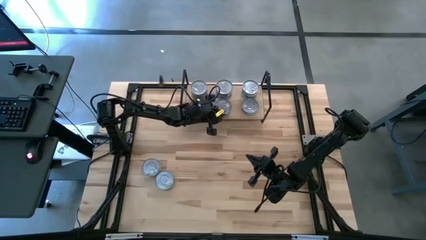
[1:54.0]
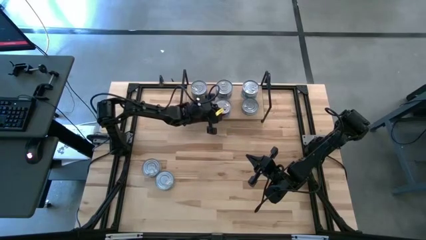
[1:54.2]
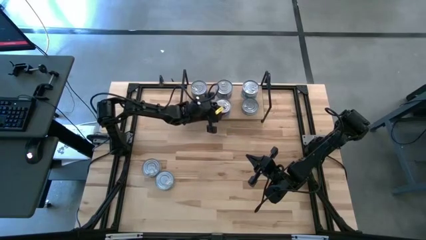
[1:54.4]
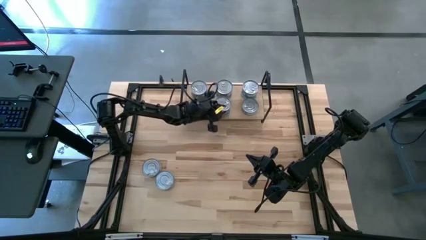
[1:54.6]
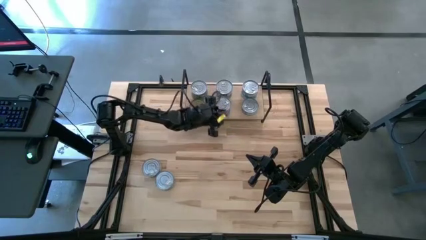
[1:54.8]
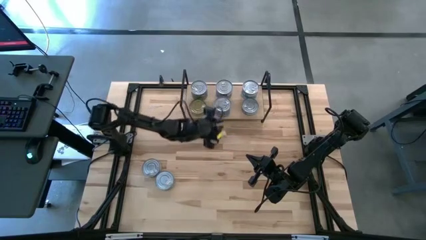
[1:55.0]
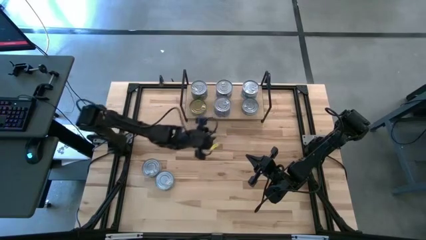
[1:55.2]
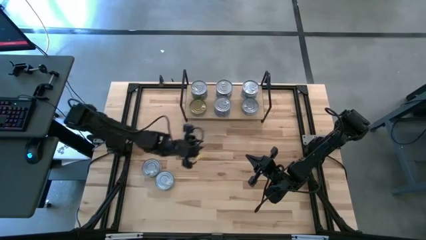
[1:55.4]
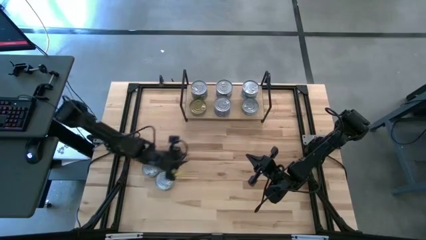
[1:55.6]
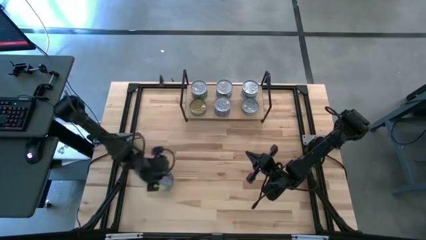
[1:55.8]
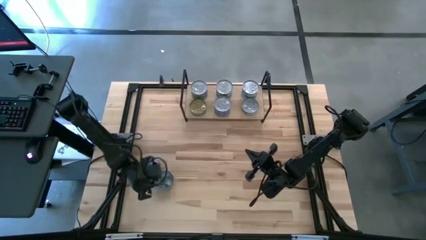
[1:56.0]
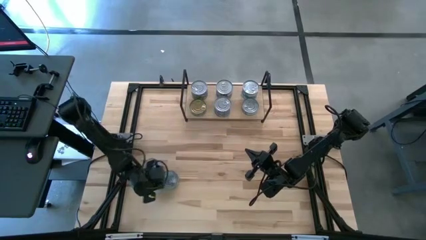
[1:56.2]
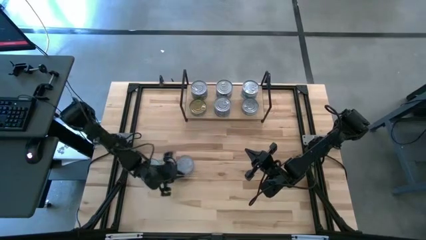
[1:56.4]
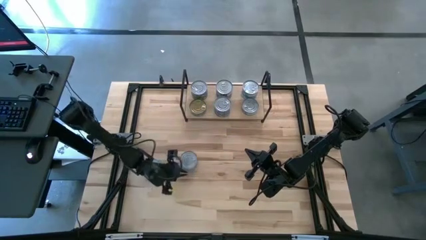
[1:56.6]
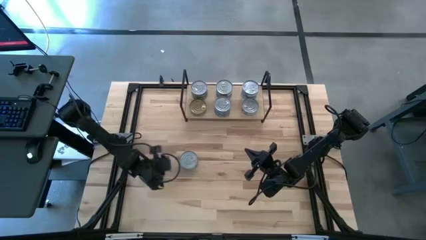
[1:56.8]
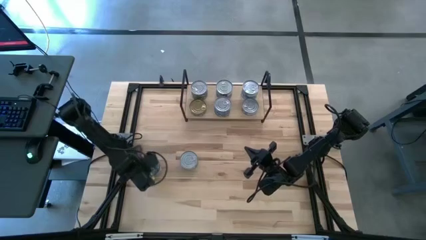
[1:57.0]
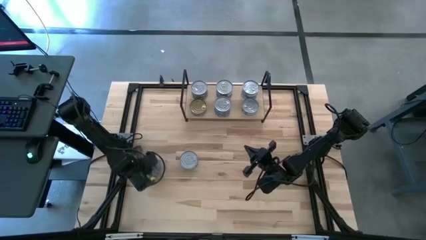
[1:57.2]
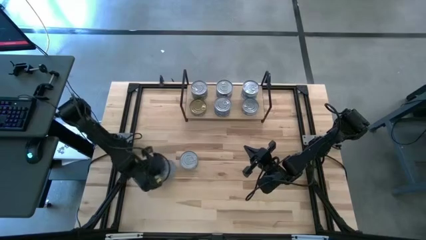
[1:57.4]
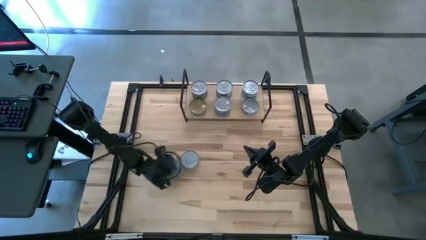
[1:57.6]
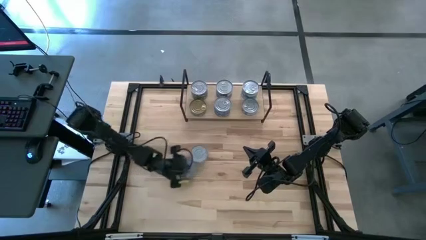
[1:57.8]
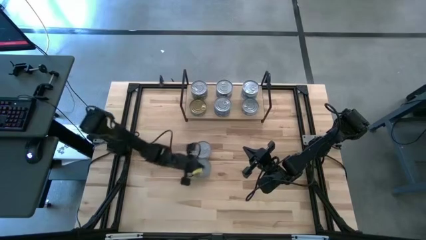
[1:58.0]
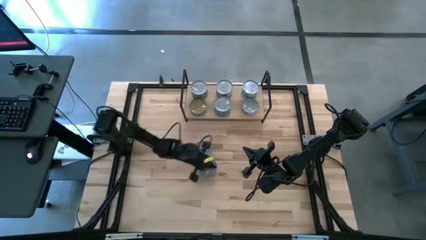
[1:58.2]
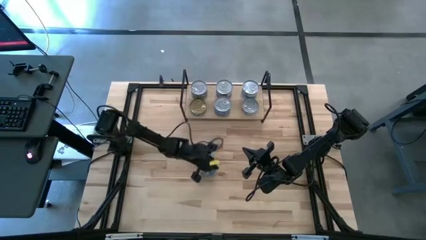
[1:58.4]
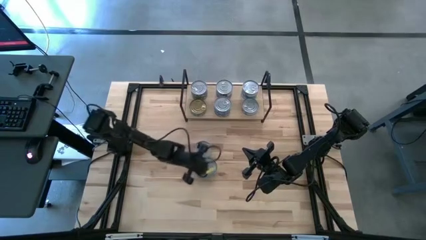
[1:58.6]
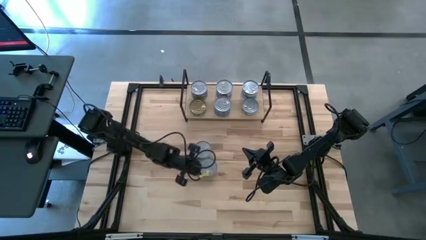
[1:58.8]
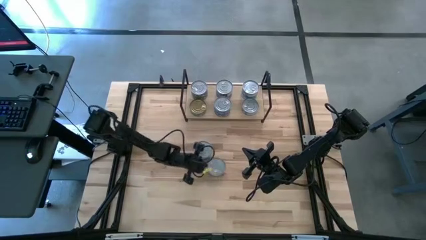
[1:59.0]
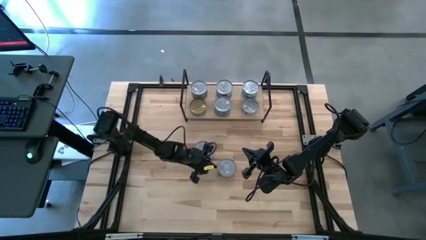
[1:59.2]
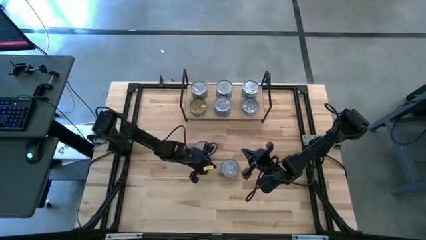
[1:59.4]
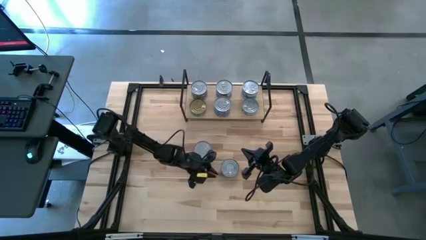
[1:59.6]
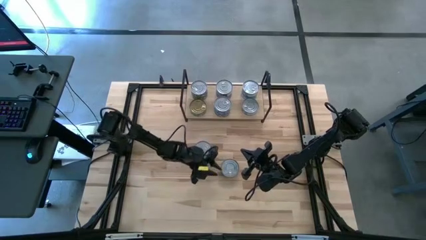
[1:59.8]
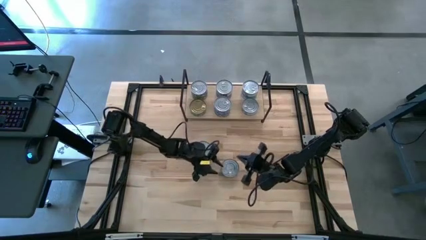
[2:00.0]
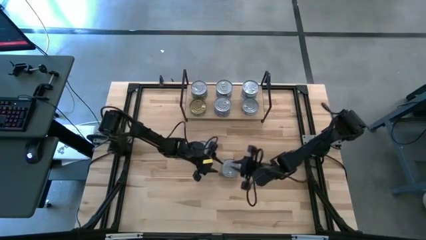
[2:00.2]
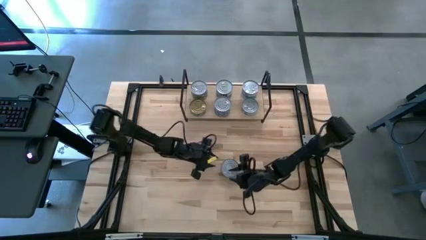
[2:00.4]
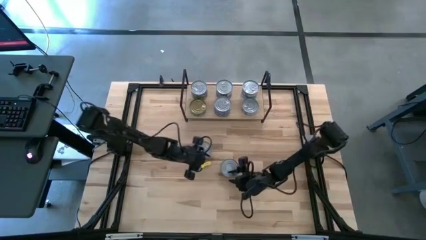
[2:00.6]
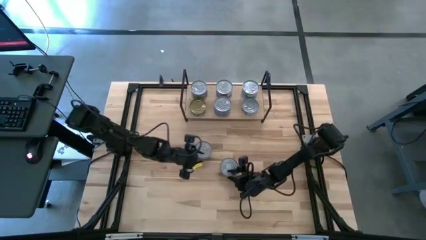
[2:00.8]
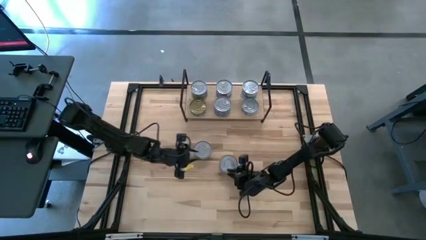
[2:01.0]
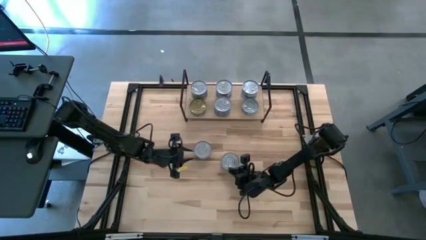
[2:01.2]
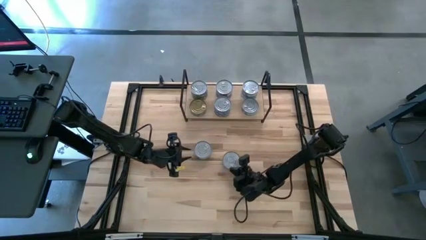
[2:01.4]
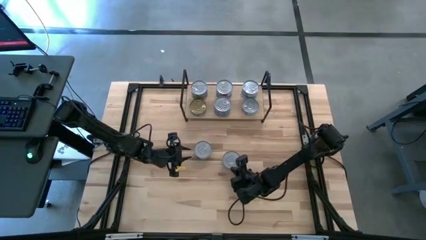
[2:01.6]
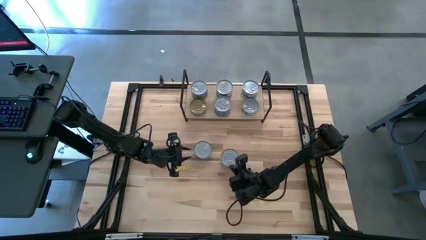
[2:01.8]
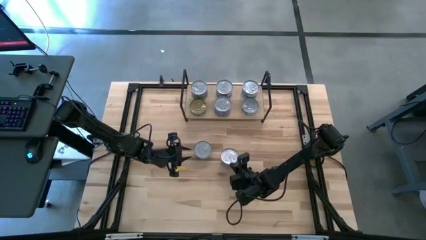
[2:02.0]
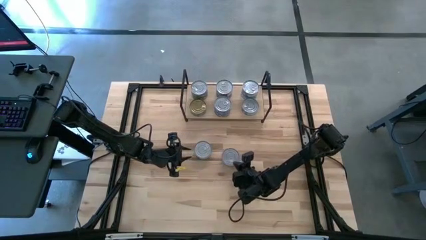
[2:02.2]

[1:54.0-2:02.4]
Task: Stack canned seafood by type on shelf
Stack the yellow-blue tuna can on top of the yellow-blue tuna can on the shelf

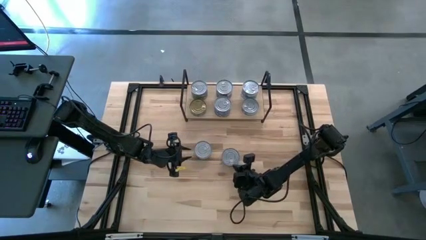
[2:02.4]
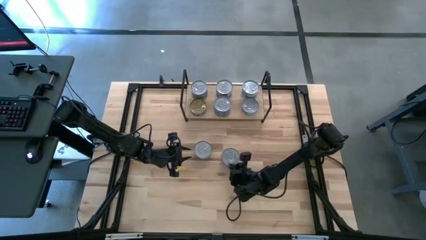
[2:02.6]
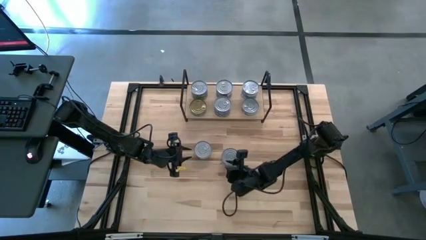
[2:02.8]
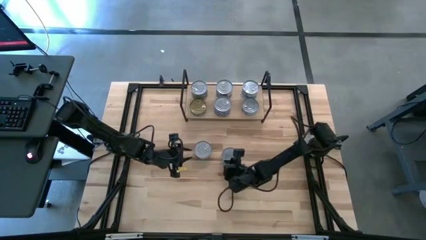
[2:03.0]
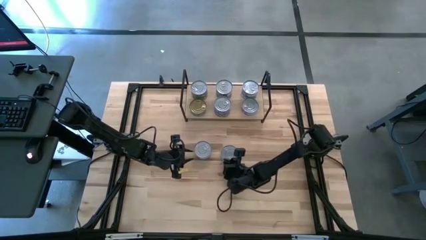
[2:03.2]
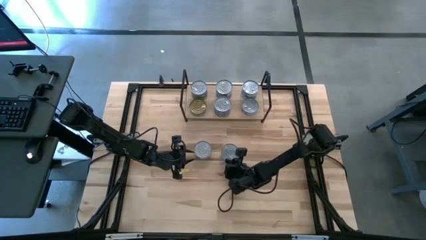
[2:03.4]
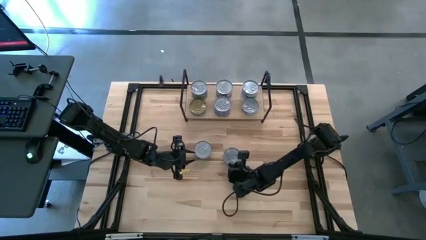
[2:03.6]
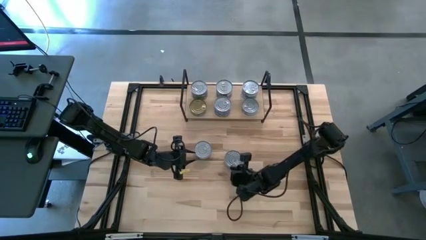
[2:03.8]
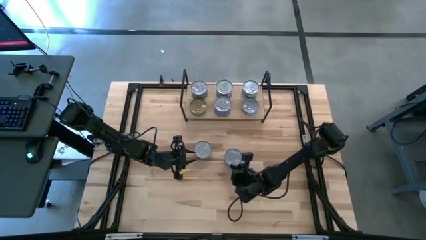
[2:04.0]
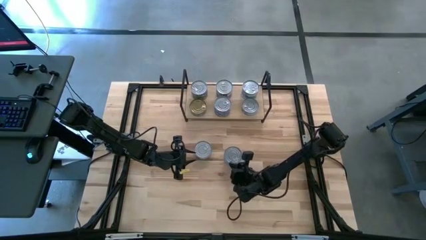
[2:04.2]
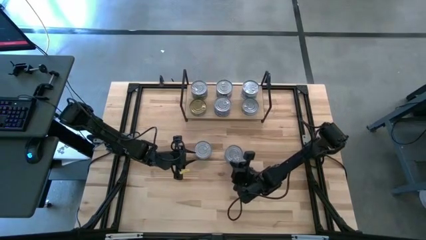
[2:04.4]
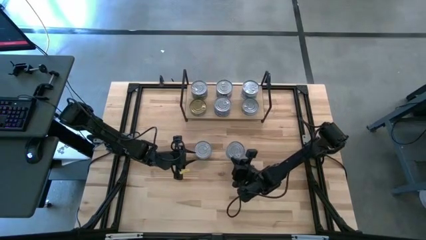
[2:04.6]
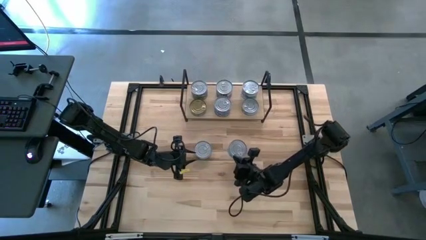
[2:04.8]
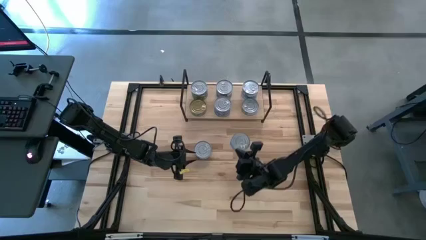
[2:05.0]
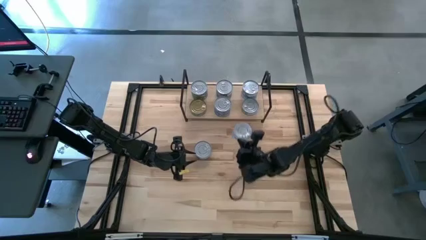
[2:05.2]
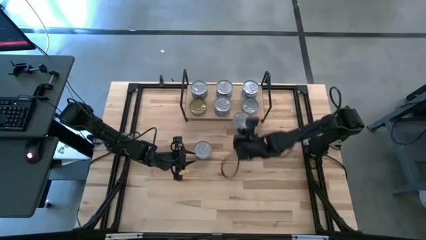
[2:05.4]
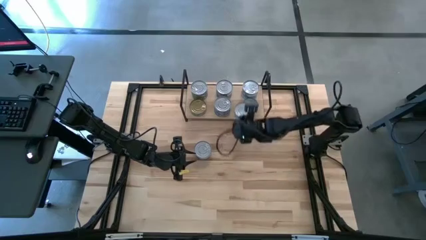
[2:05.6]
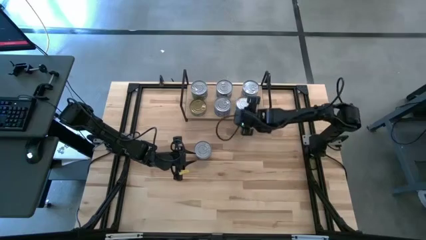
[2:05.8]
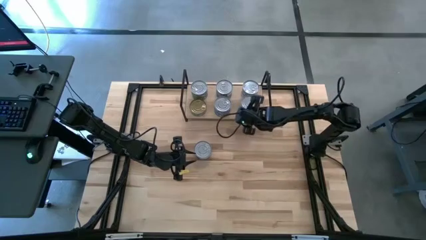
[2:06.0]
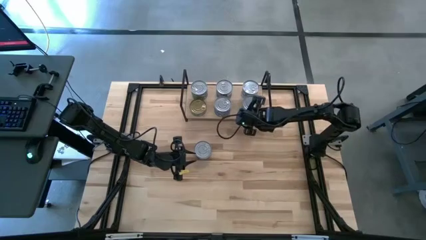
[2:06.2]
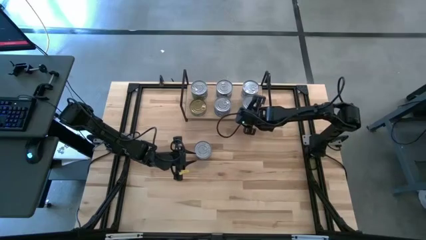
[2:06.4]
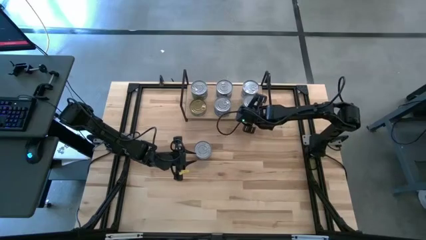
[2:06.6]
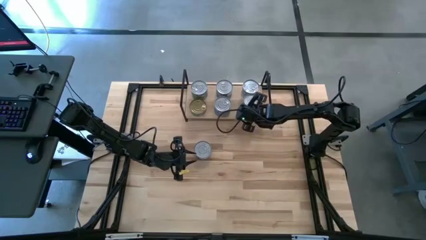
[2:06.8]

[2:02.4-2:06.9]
Stack the yellow-blue tuna can on top of the yellow-blue tuna can on the shelf

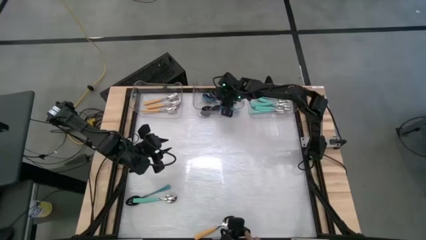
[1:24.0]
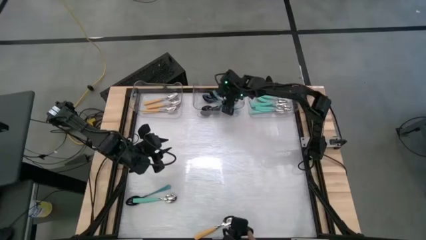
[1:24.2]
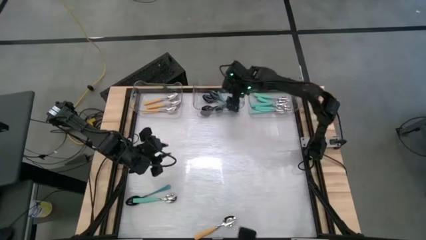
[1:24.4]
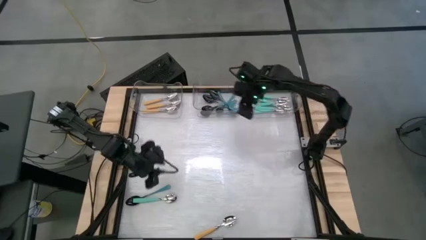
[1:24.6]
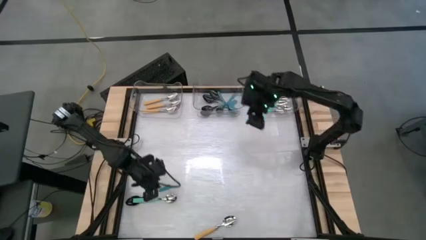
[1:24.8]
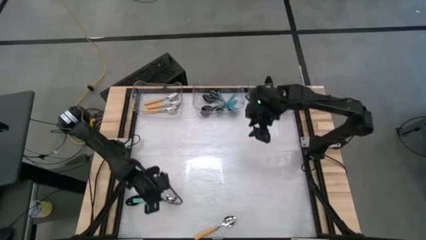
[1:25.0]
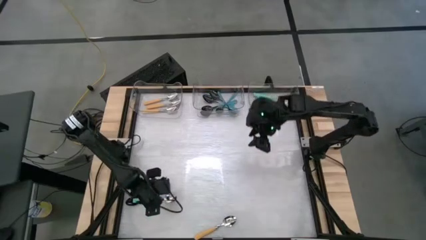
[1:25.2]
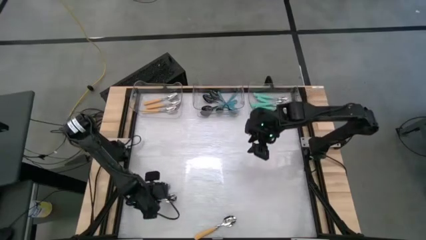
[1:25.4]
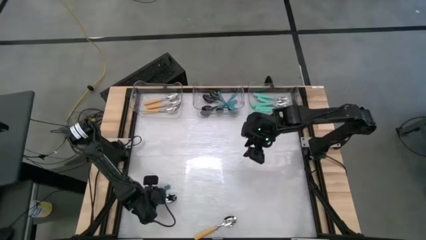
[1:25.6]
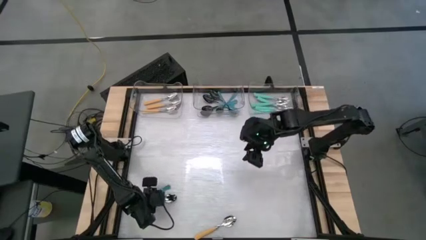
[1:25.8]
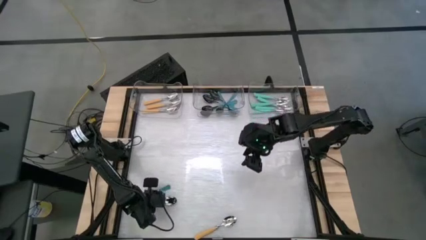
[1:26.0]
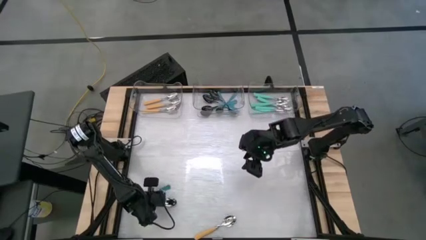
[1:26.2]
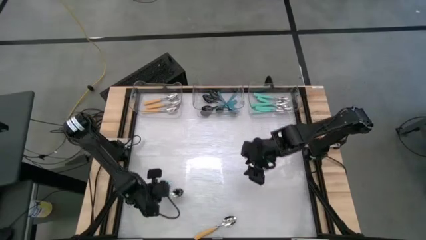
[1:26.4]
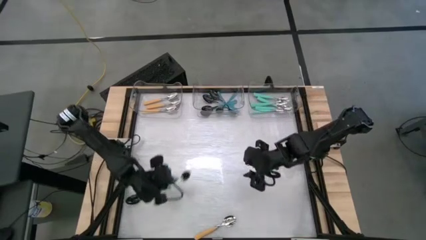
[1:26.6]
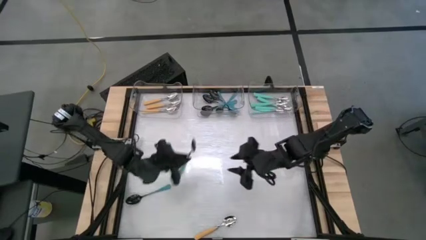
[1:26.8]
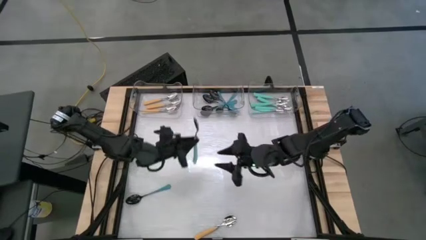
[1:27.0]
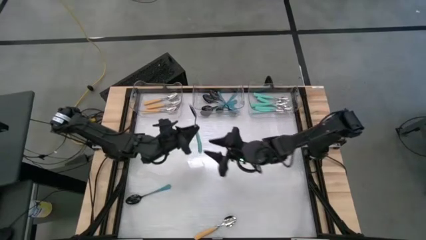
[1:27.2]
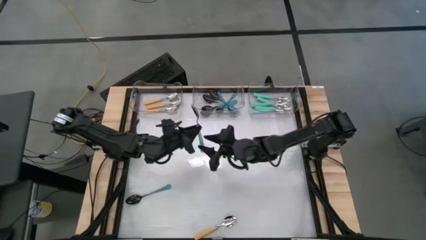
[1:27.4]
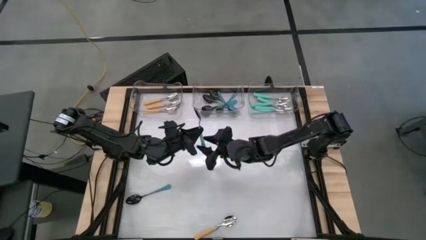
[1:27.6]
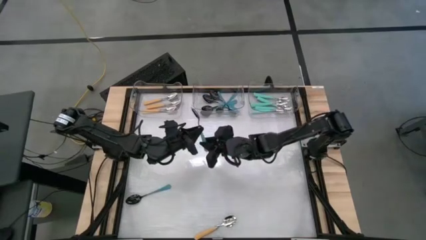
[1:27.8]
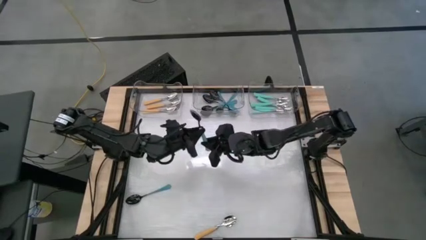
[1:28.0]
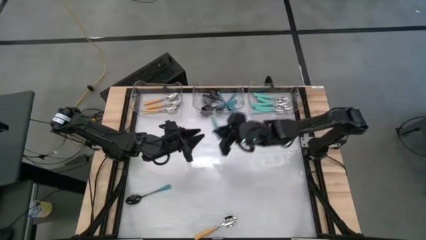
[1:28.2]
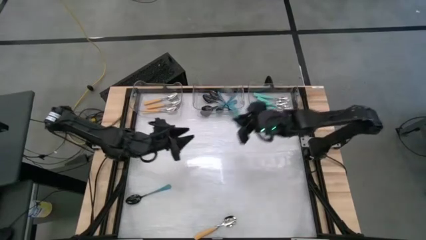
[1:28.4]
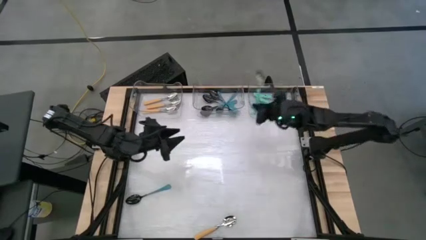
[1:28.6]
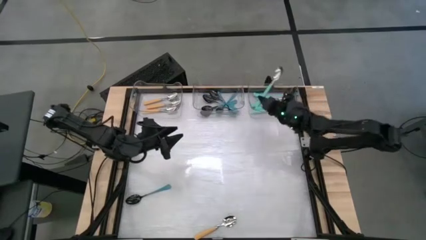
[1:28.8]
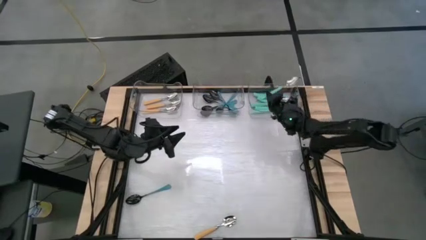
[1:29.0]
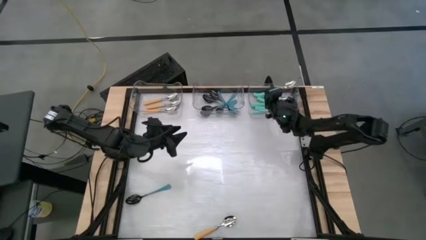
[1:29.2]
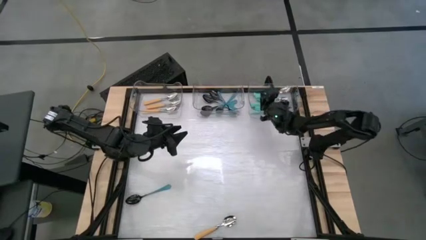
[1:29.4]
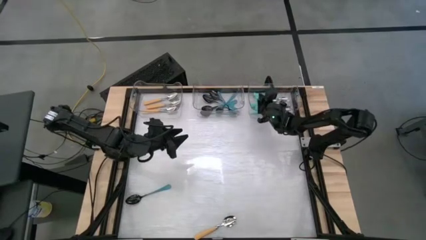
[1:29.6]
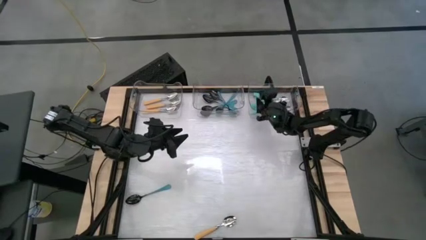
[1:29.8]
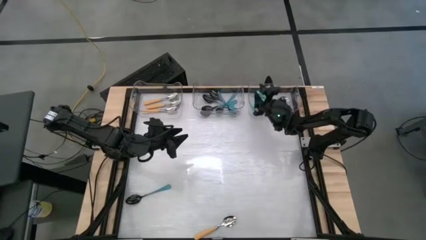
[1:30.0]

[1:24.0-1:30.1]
Task: Sort silverware by color (type)
Put the light green spoon into the right transparent bin
